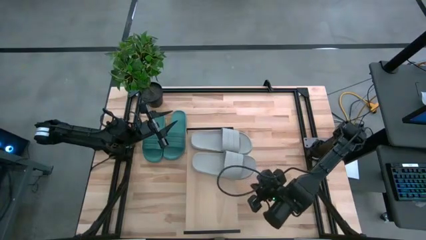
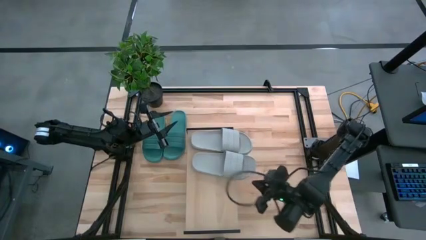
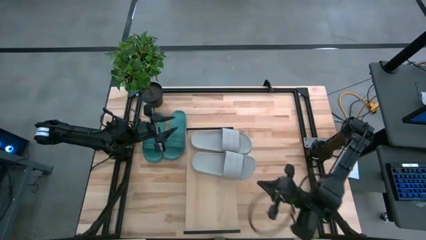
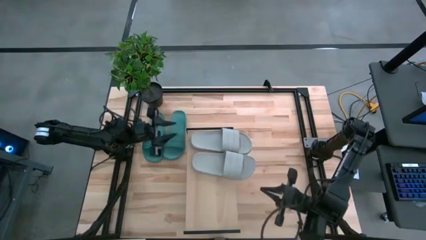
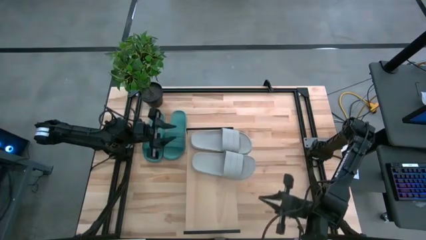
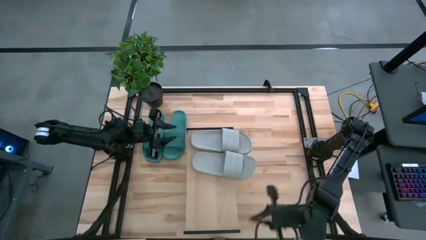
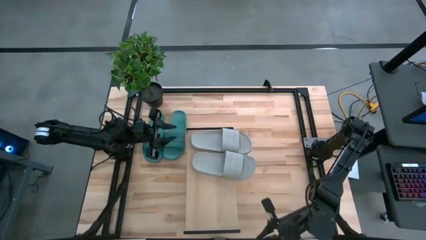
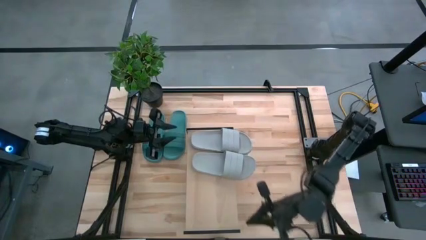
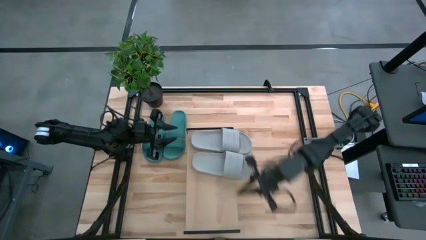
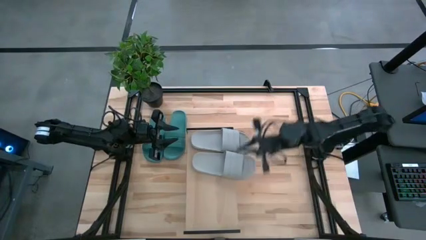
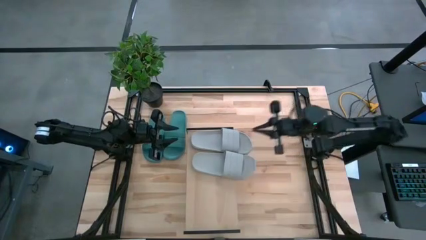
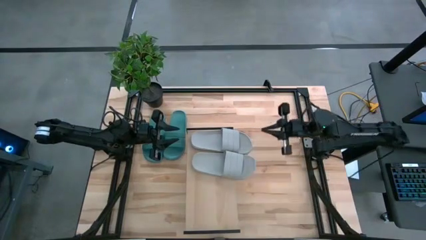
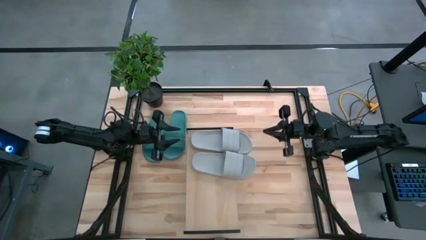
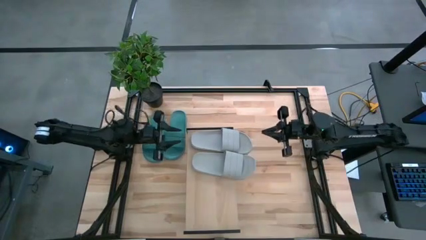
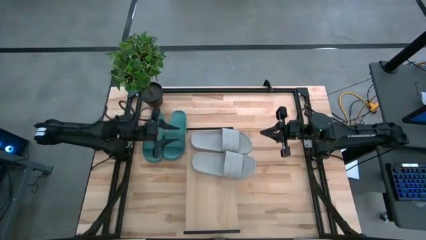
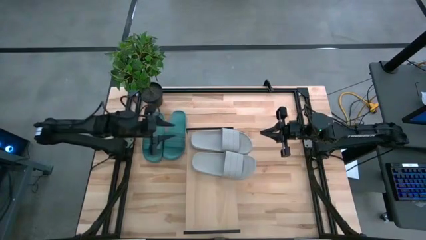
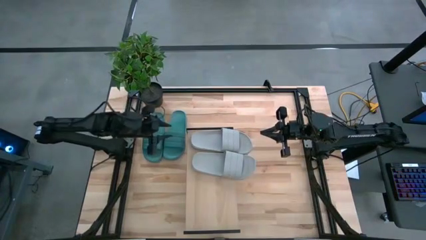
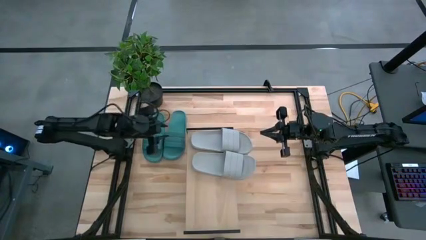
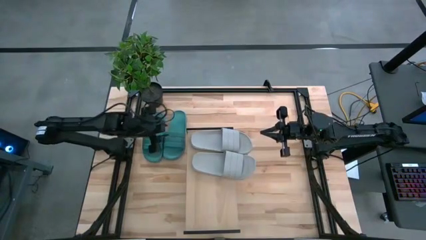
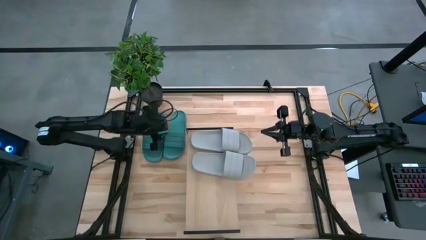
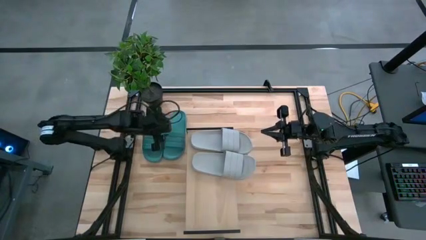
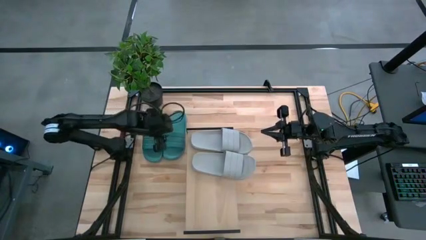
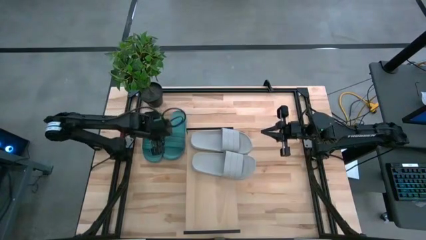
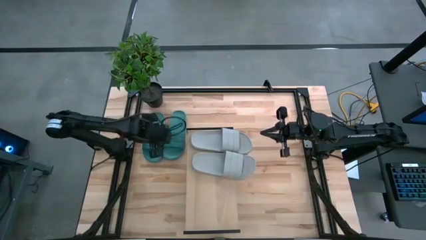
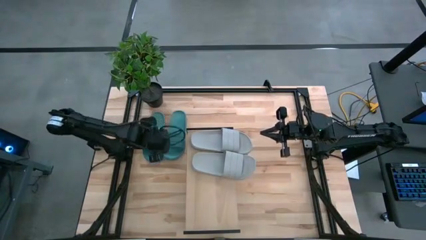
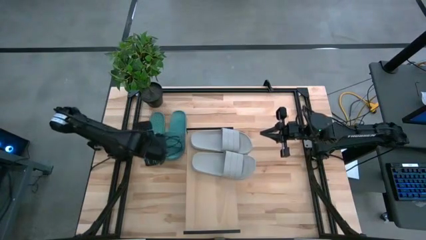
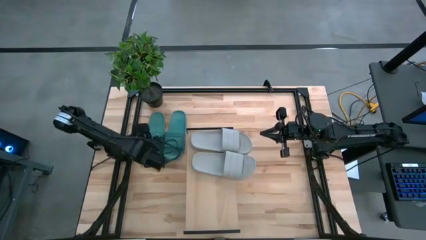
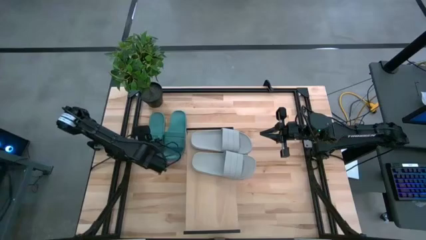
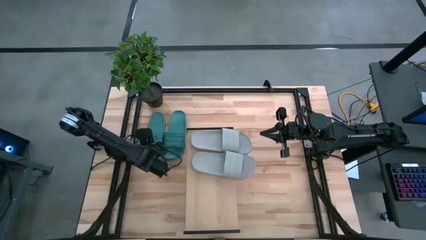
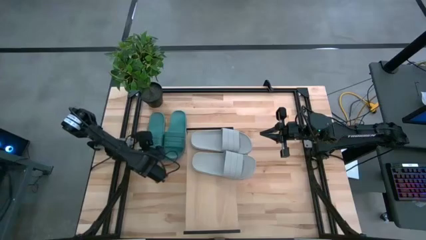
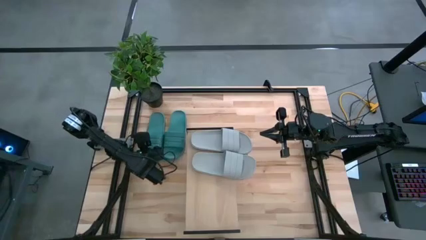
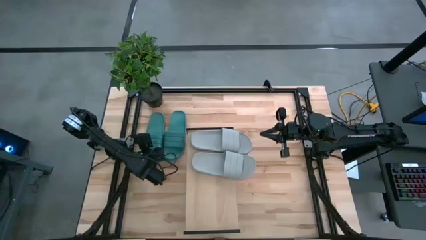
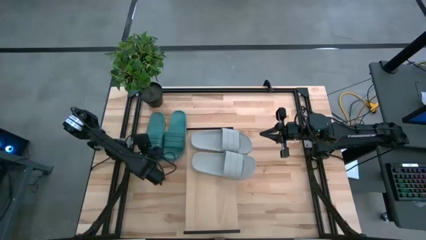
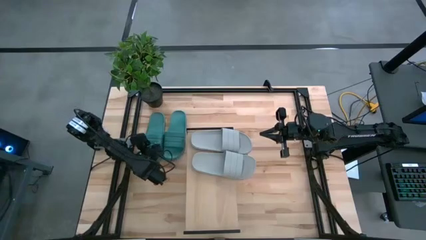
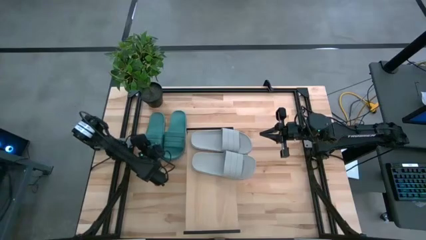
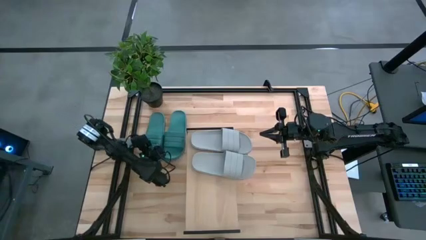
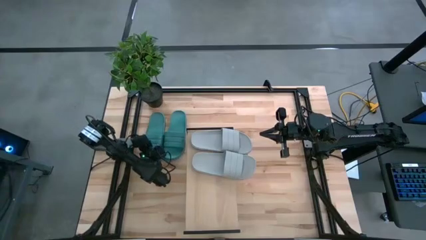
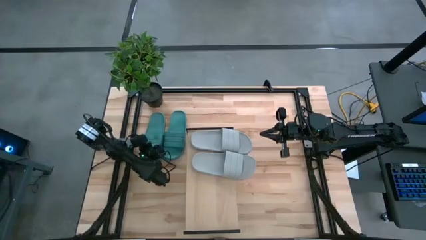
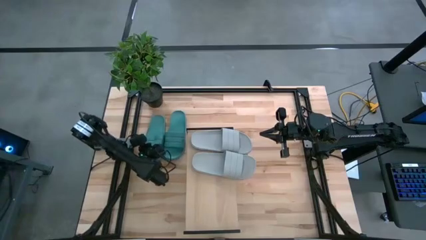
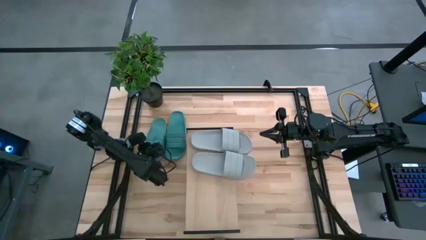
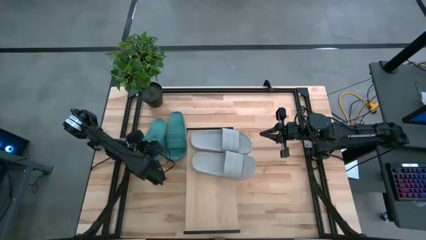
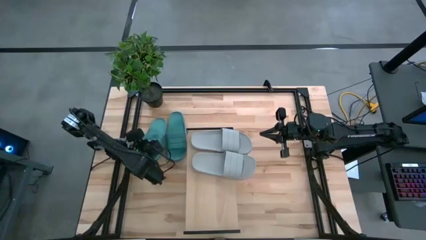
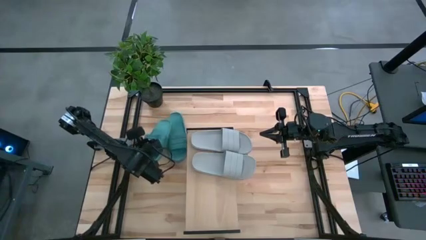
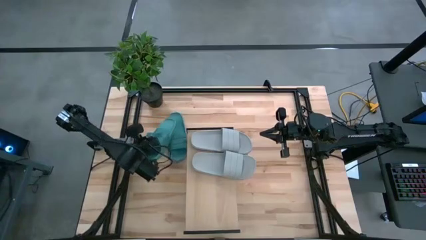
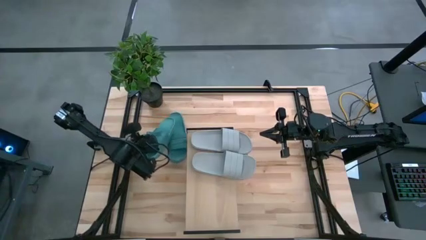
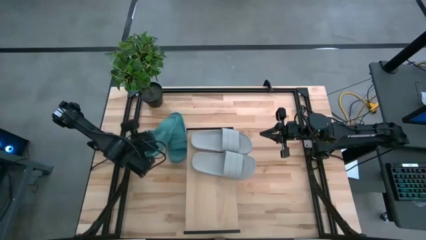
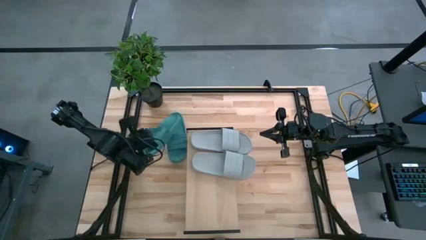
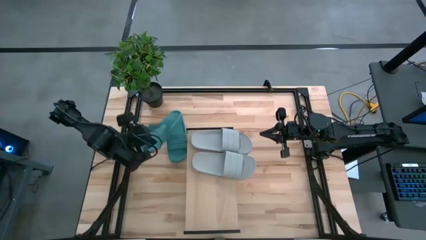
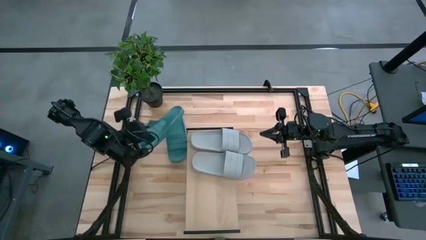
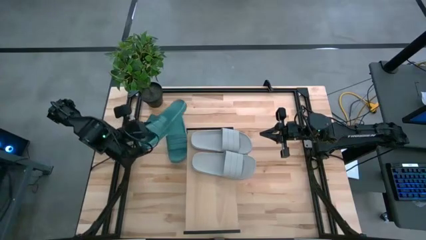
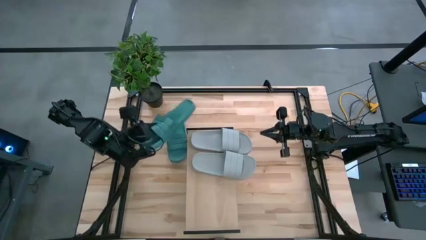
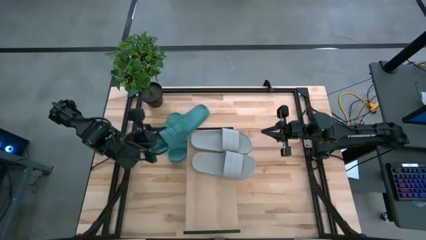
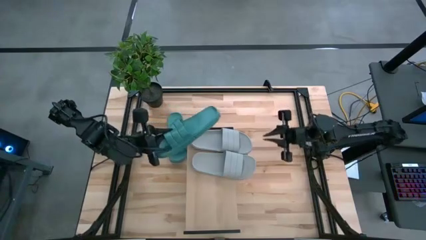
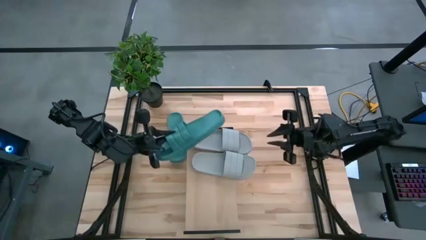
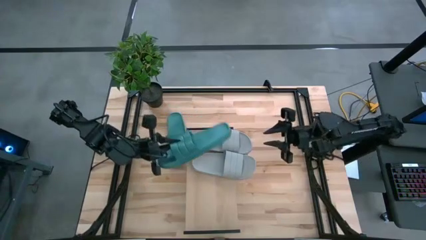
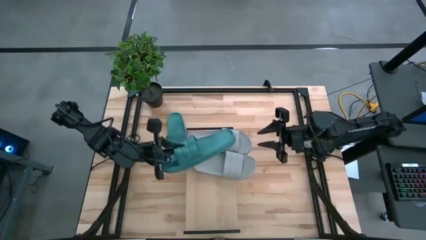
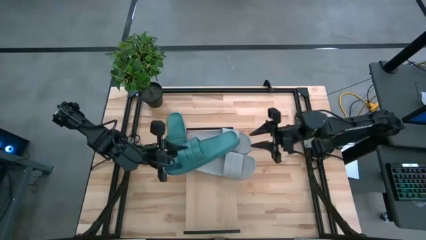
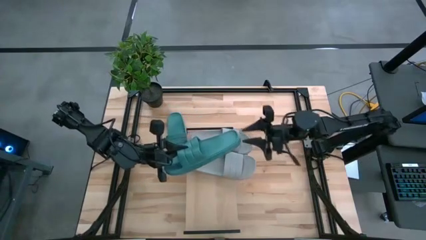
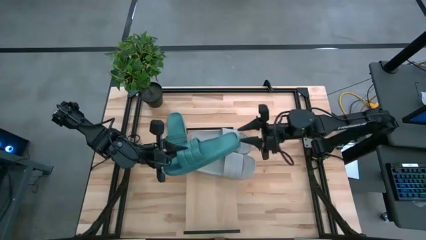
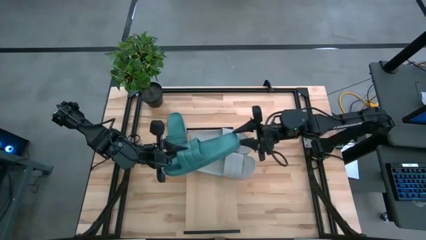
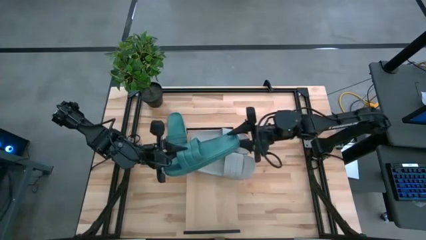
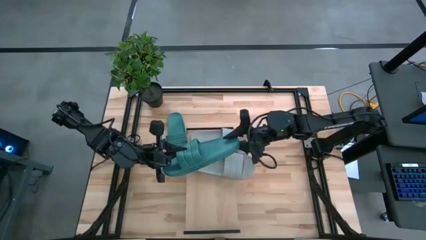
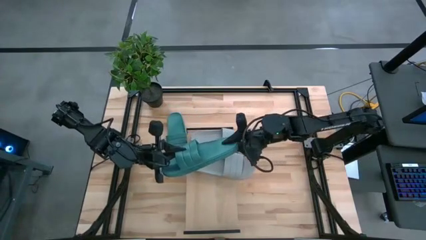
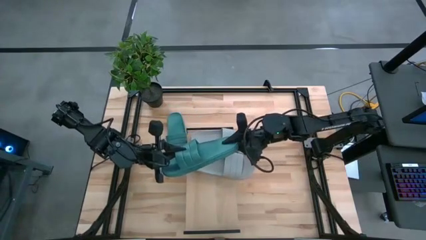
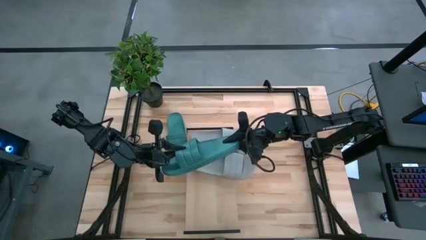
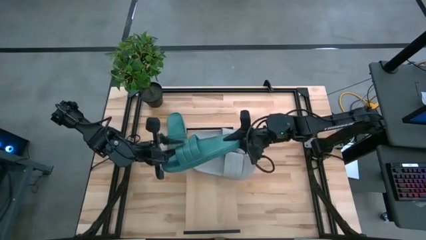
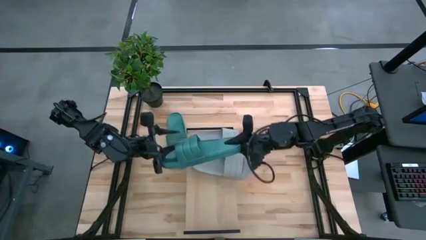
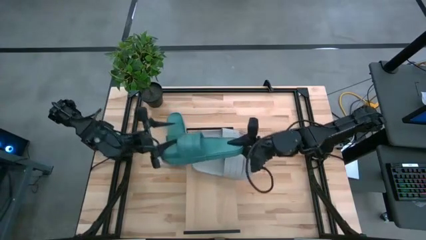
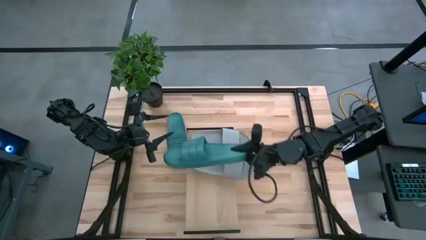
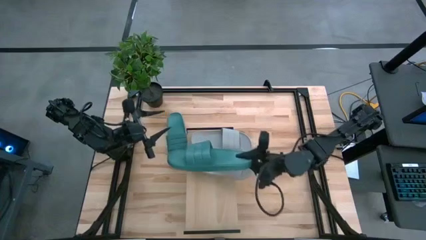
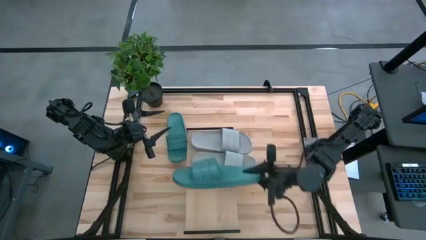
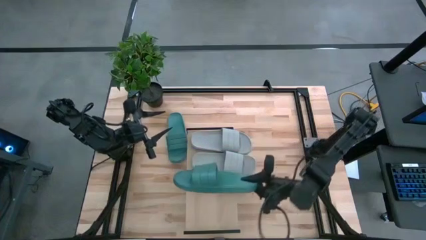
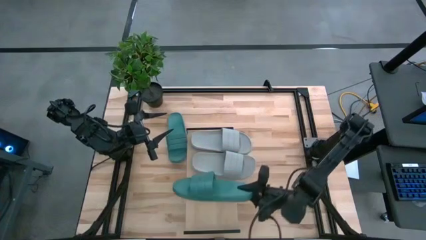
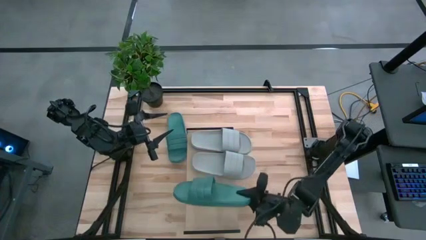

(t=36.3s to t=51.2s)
Task: Pick and place slides into the shelf
Put the left green slipper on the shelf
